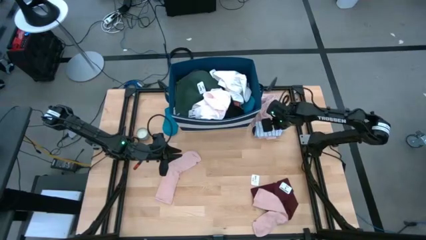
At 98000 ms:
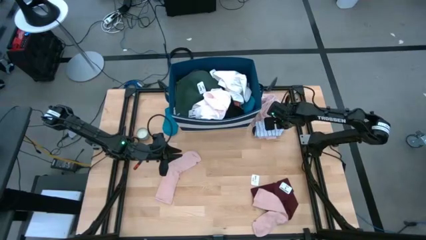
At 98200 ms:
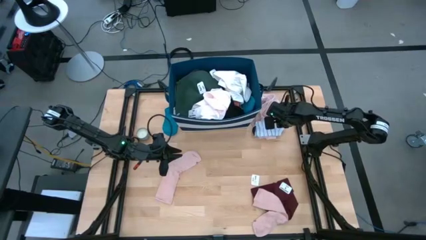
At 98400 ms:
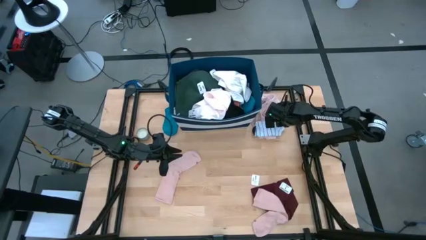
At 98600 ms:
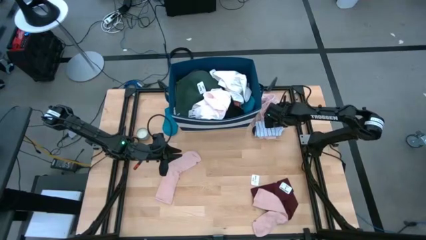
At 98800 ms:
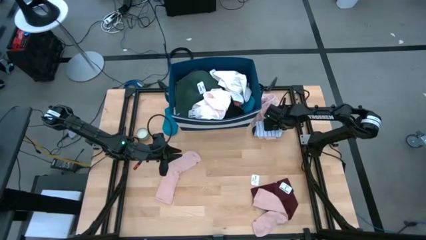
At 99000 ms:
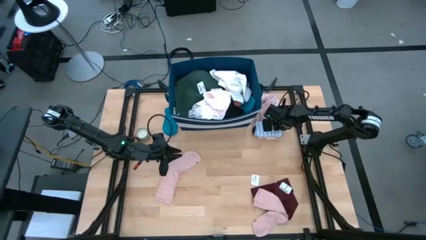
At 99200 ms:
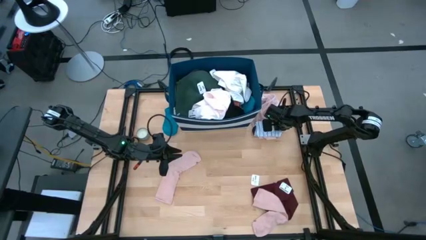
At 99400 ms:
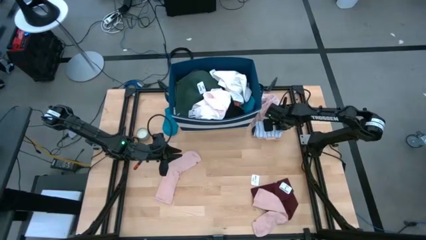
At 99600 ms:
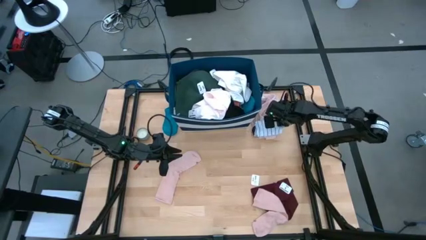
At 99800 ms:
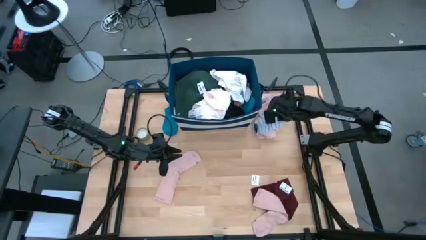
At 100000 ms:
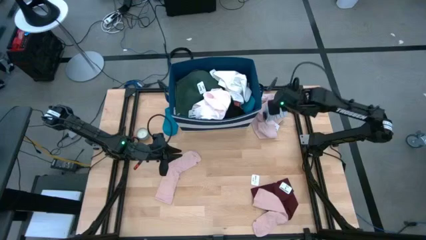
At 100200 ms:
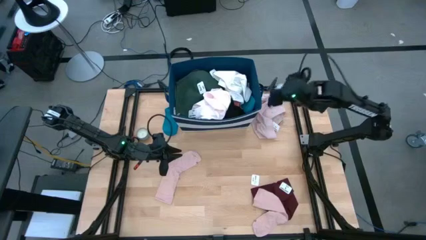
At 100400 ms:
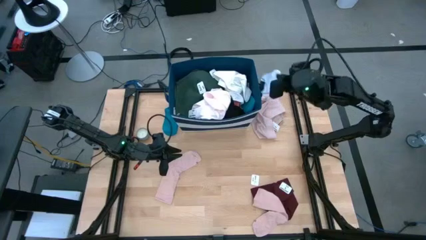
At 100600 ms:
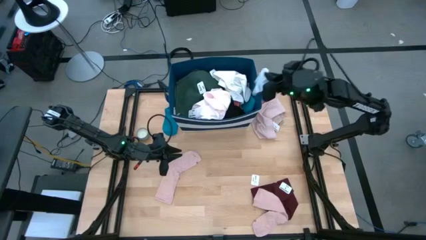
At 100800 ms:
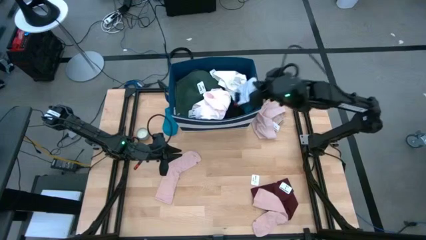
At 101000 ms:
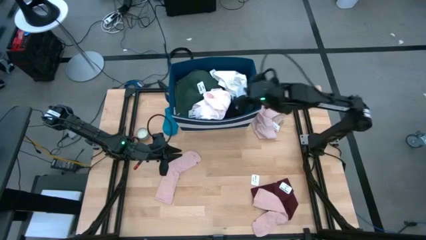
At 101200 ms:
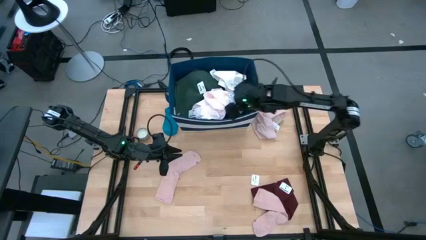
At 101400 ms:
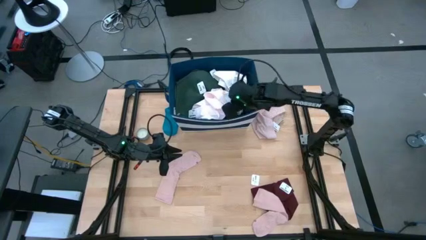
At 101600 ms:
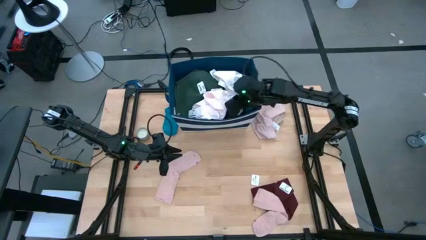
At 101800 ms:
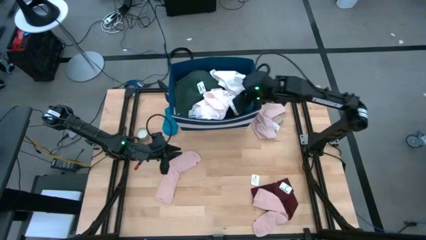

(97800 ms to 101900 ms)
Task: Sort clothes
Put the white sock into the blue laundry bin

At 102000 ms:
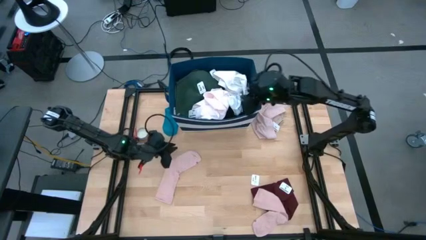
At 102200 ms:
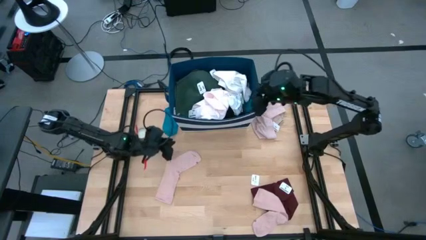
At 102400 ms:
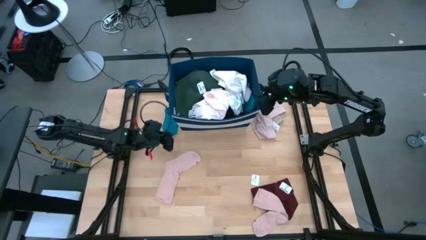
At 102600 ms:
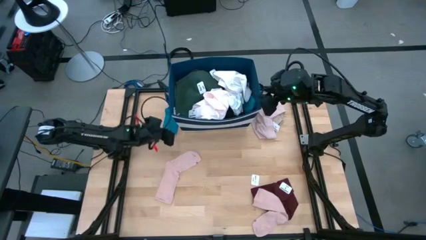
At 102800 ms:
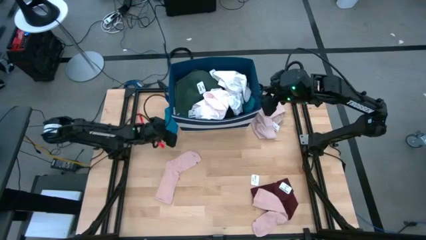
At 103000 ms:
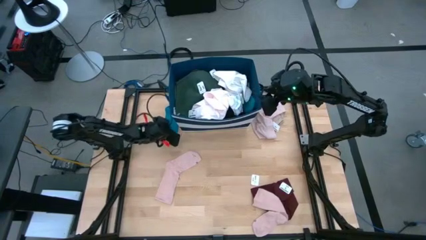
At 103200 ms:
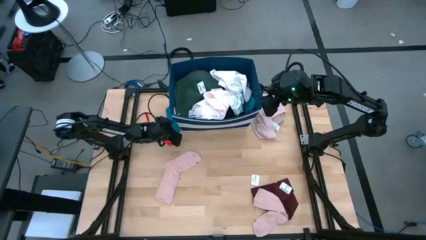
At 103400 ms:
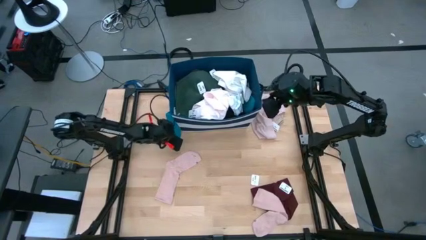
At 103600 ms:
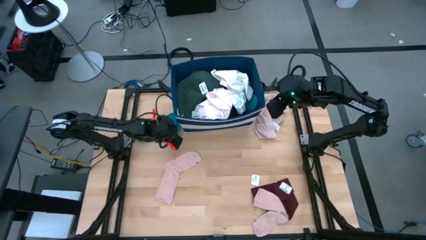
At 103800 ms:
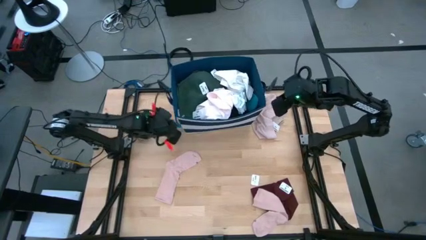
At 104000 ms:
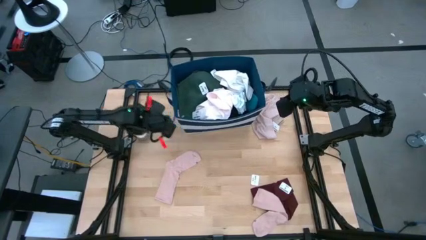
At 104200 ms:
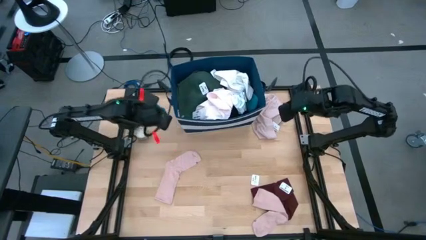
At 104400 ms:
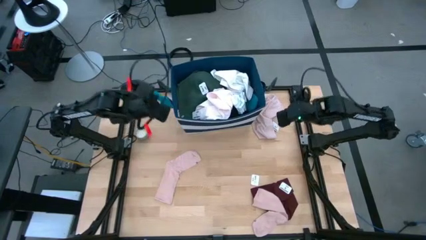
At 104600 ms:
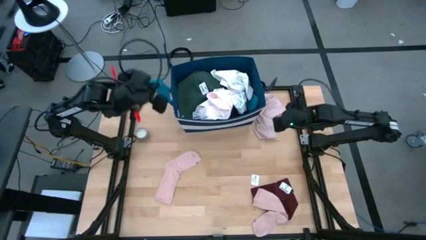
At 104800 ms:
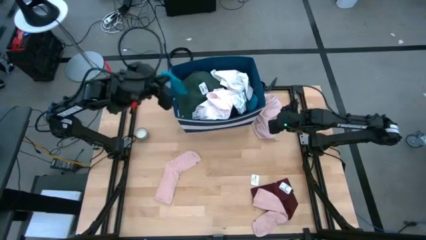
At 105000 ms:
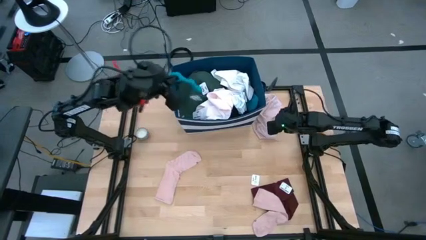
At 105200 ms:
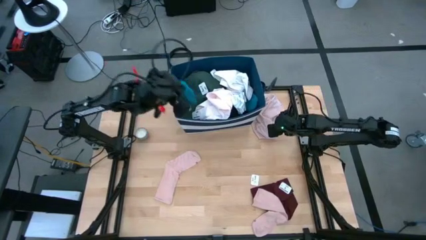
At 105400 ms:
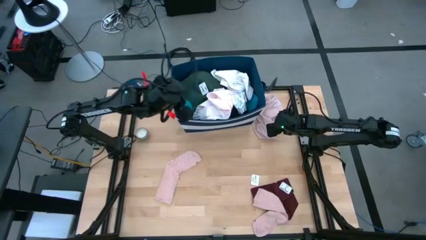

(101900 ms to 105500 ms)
Put the blue sock into the blue laundry bin

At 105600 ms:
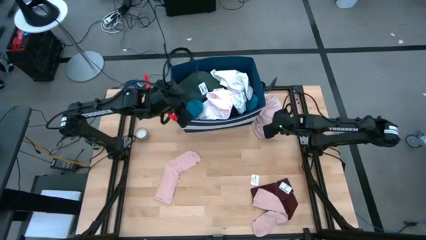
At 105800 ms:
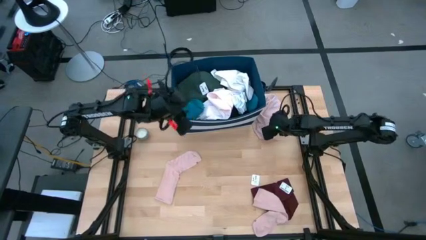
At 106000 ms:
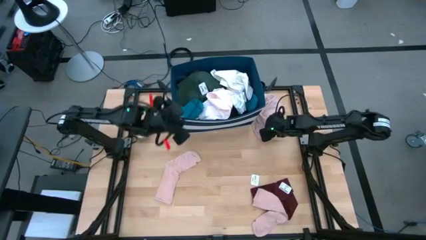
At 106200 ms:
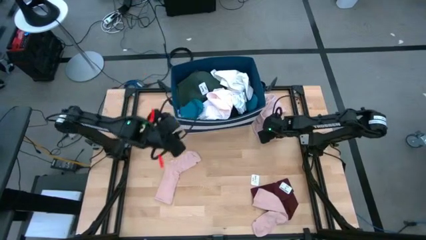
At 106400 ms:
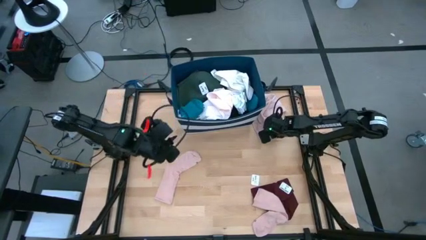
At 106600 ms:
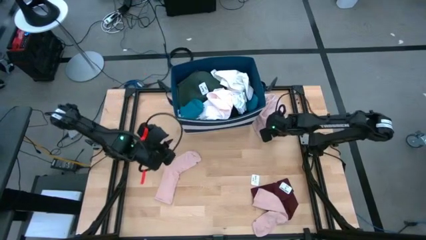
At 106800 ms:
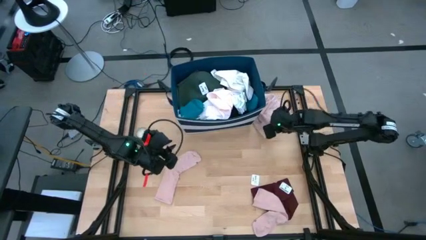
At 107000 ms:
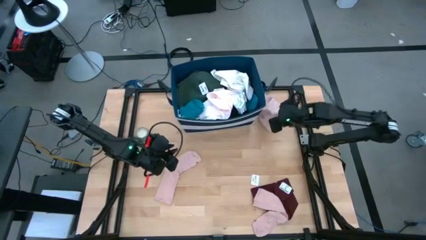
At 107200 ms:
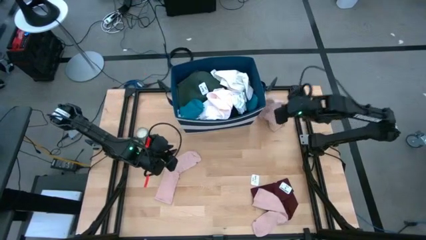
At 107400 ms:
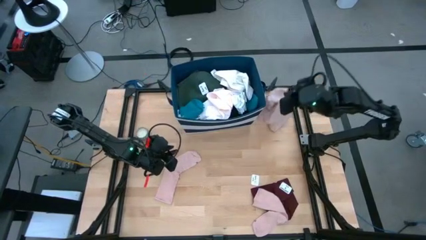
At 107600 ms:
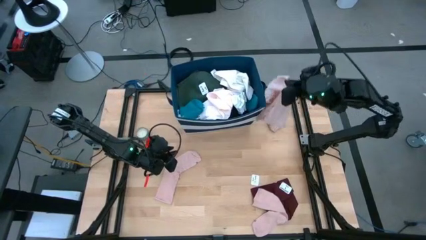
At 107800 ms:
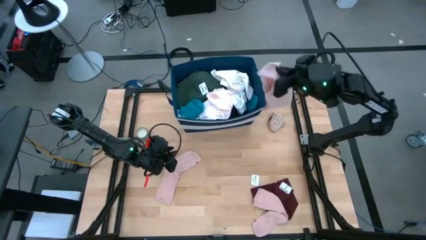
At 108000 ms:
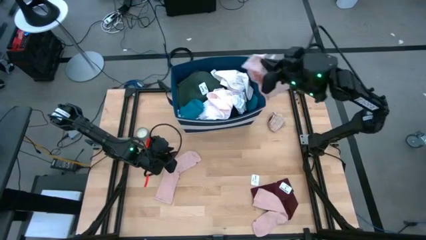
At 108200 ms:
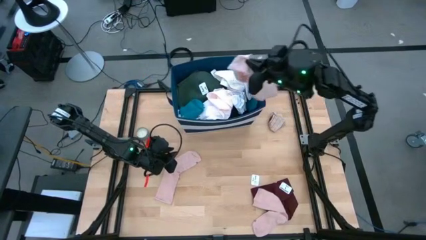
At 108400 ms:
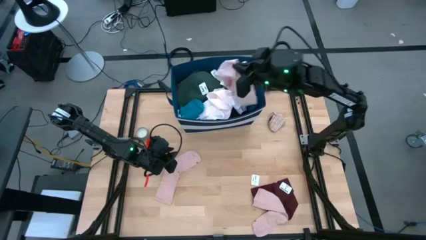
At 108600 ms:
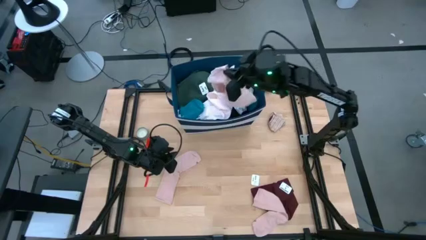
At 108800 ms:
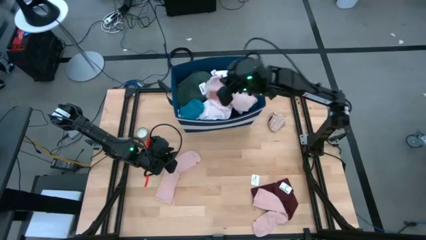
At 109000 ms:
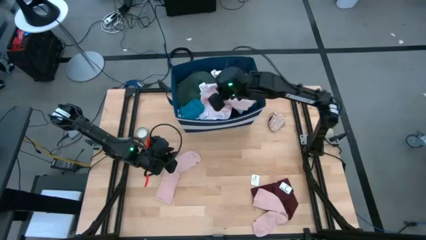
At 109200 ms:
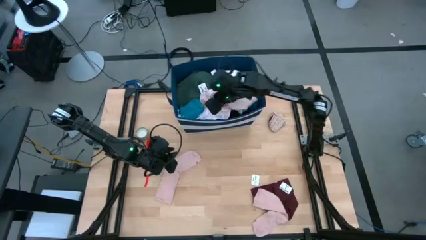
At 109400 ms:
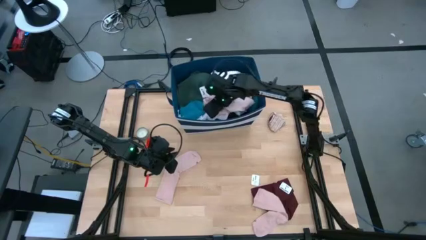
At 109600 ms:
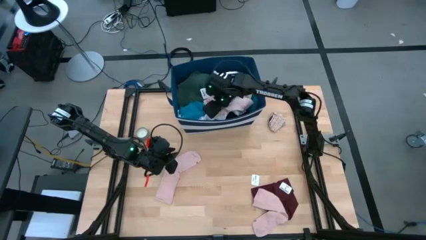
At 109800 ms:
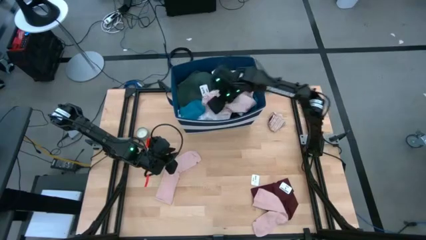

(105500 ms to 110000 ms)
Put the pink underwear into the blue laundry bin

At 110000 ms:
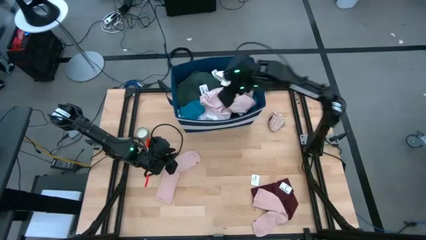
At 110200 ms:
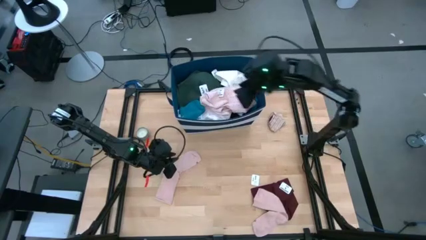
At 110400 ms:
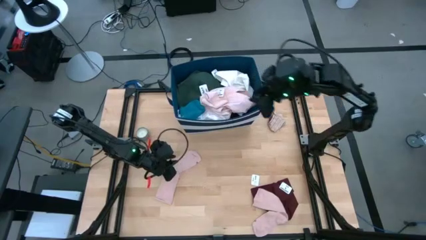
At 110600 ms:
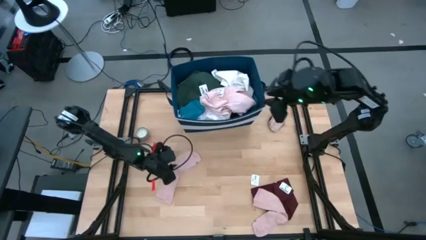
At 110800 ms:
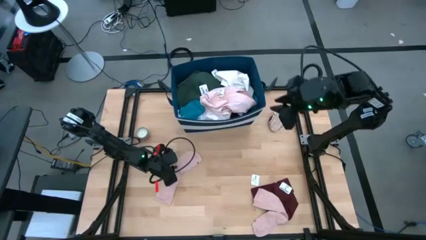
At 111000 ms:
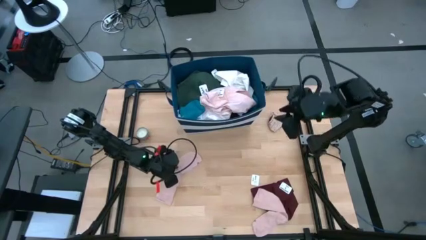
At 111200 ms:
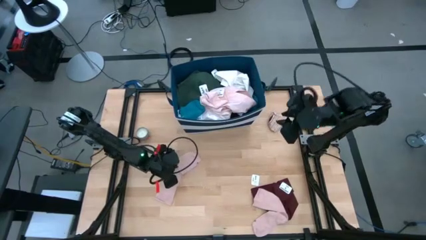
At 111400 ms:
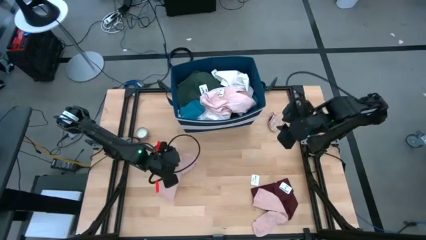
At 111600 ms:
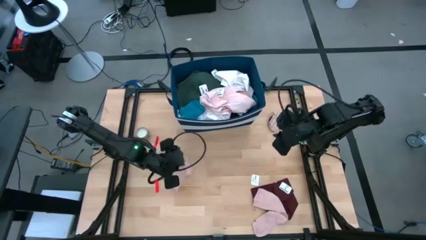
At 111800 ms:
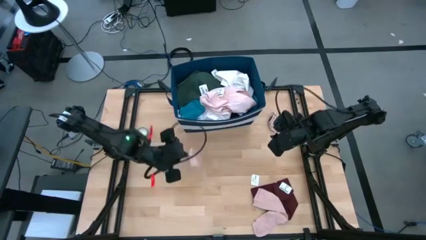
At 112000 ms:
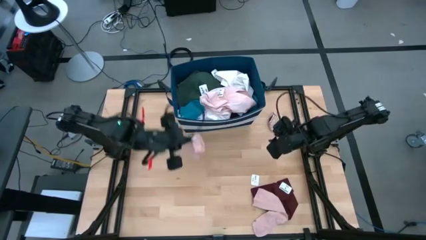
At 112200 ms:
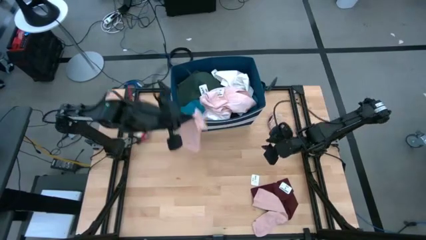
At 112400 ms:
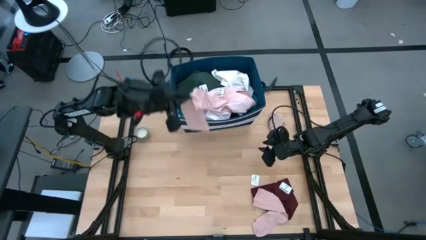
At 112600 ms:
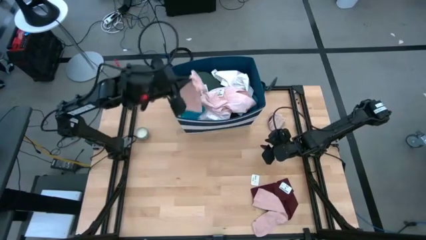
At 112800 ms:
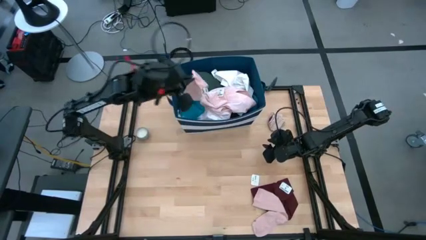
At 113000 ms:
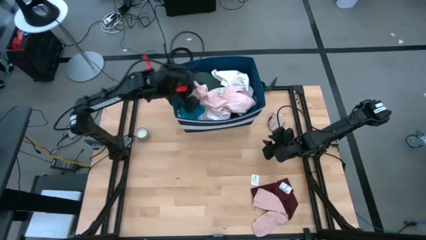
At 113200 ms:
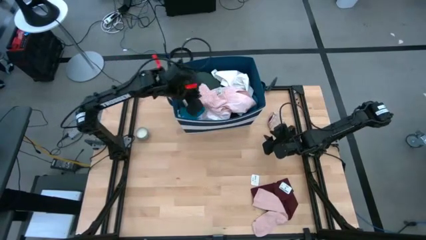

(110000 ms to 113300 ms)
Put the pink sock into the blue laundry bin

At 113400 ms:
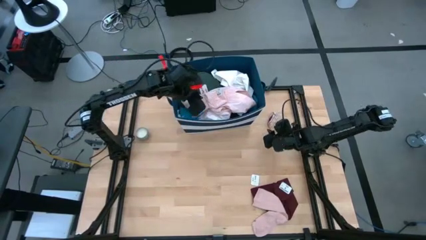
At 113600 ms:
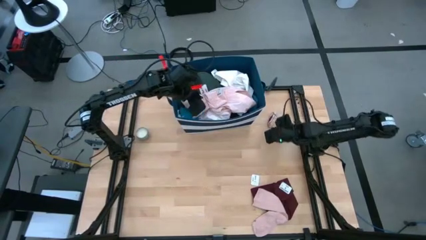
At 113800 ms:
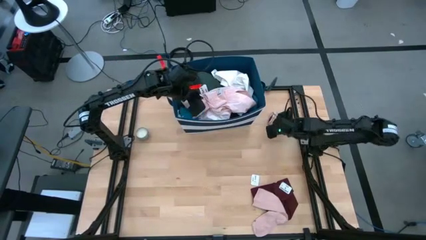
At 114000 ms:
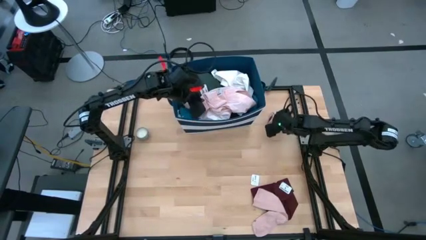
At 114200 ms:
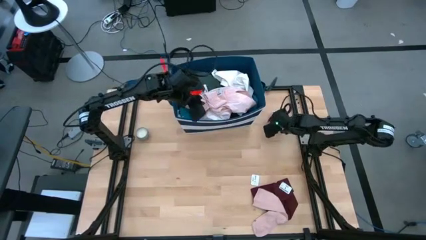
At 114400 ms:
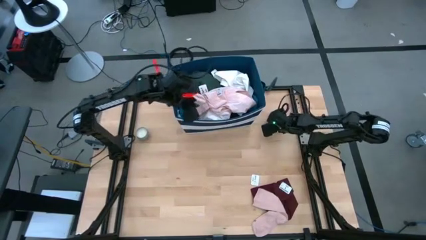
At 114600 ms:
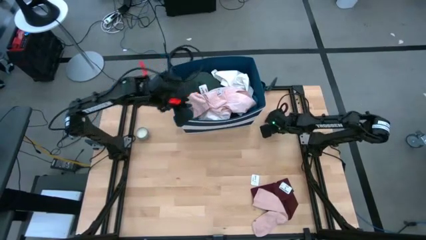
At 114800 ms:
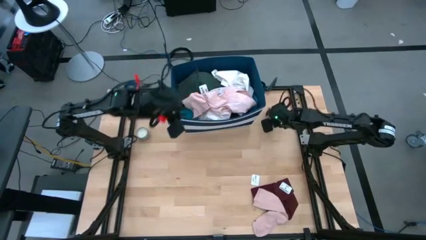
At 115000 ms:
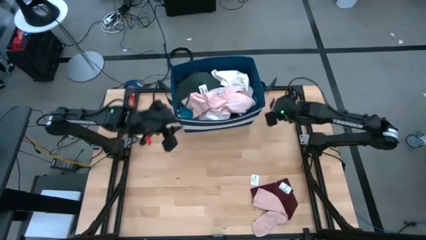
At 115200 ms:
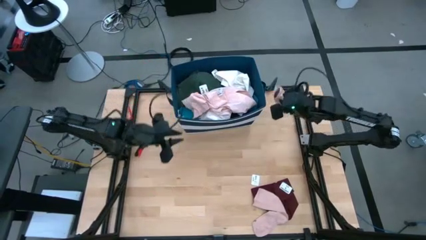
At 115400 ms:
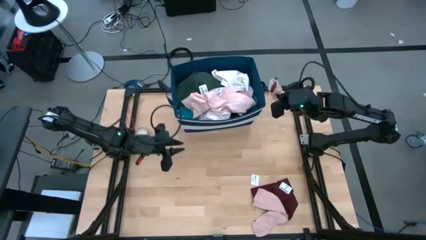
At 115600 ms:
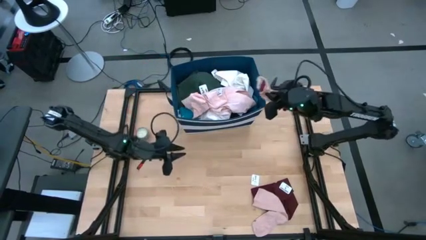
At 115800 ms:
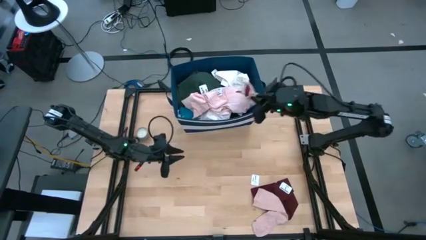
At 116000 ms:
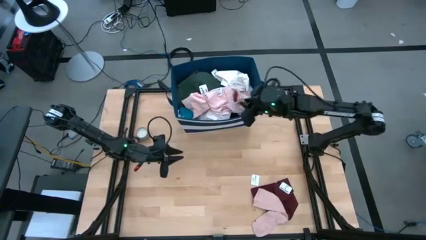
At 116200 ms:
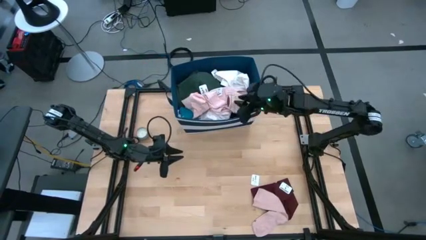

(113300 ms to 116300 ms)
Put the light brown into the blue laundry bin
